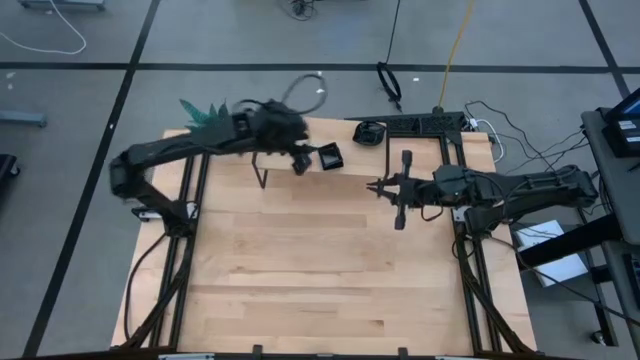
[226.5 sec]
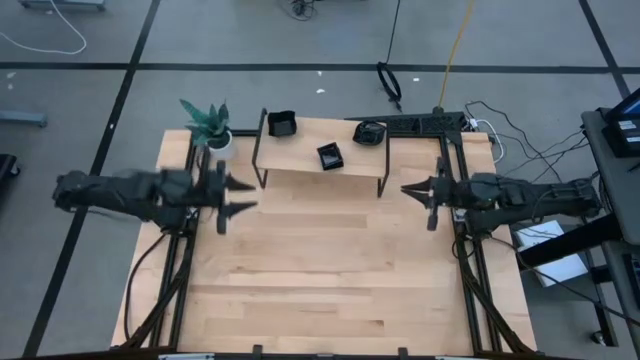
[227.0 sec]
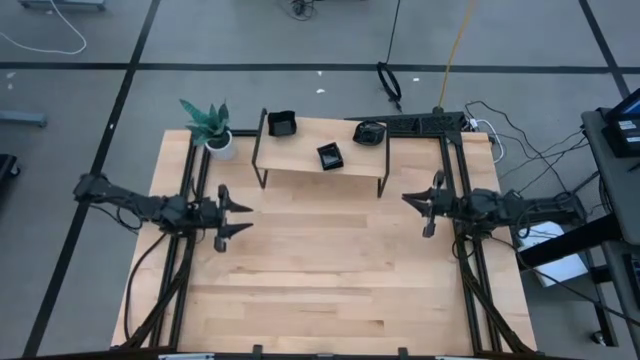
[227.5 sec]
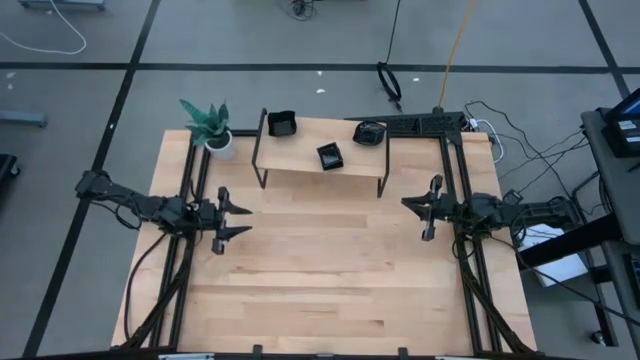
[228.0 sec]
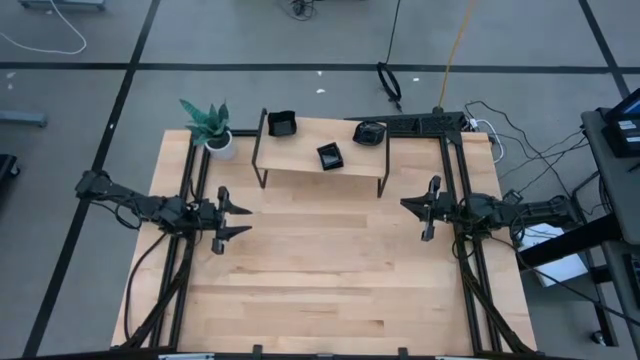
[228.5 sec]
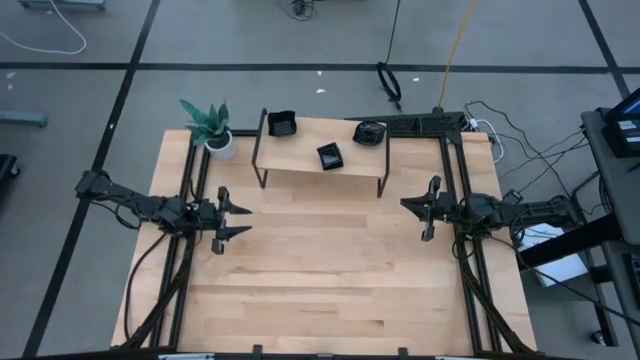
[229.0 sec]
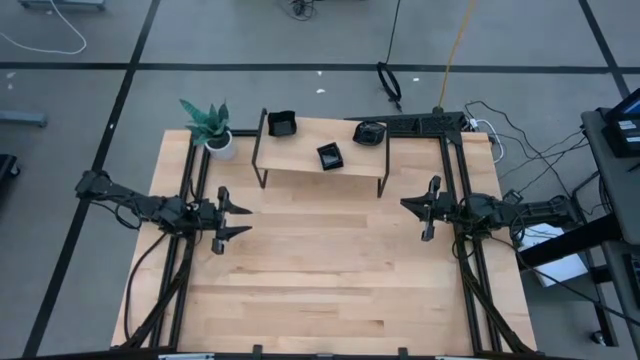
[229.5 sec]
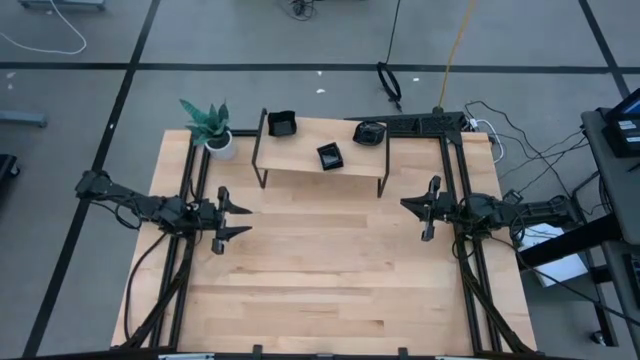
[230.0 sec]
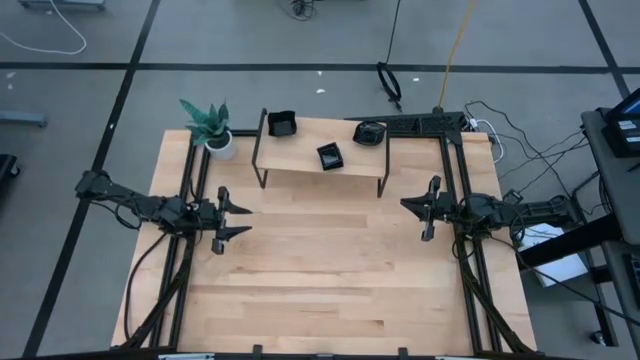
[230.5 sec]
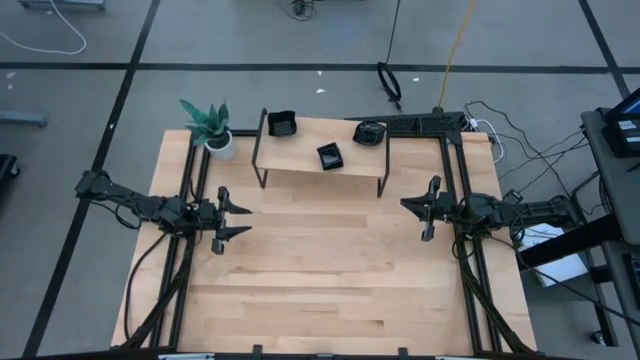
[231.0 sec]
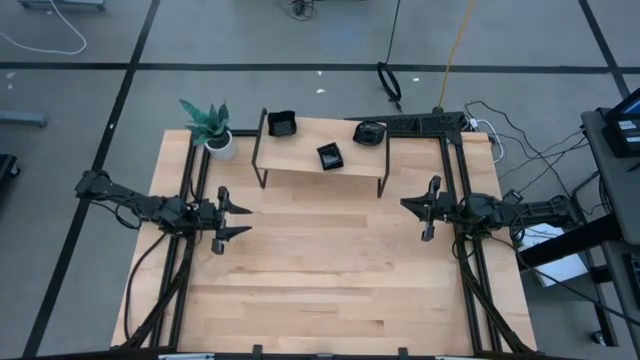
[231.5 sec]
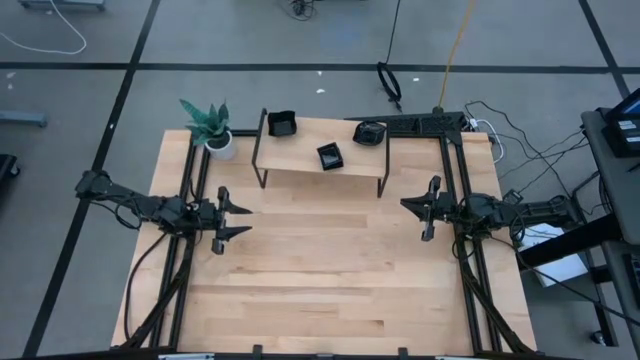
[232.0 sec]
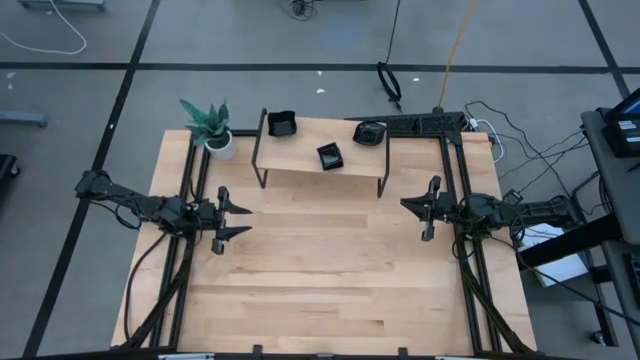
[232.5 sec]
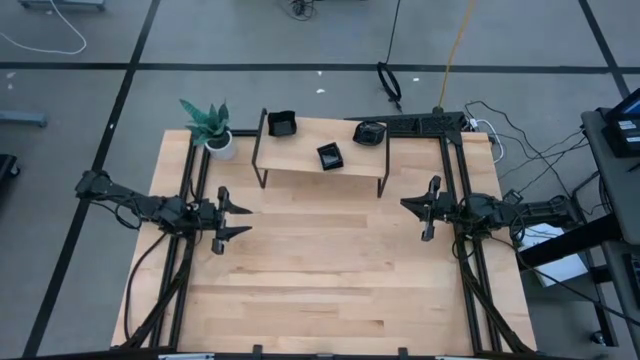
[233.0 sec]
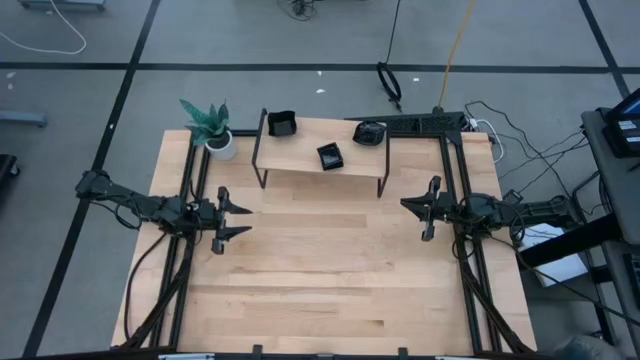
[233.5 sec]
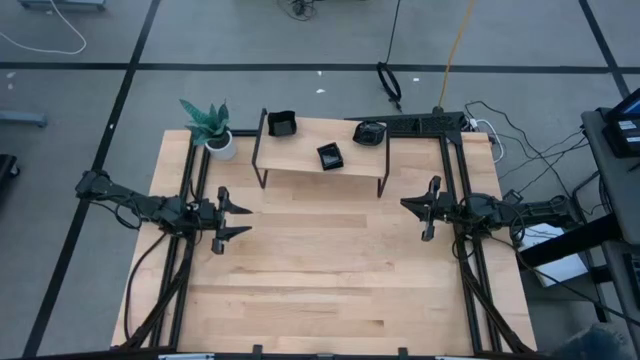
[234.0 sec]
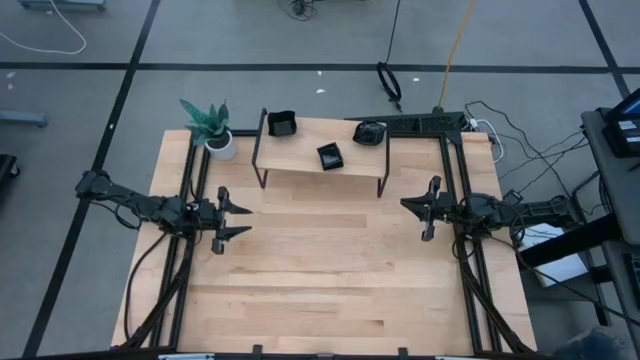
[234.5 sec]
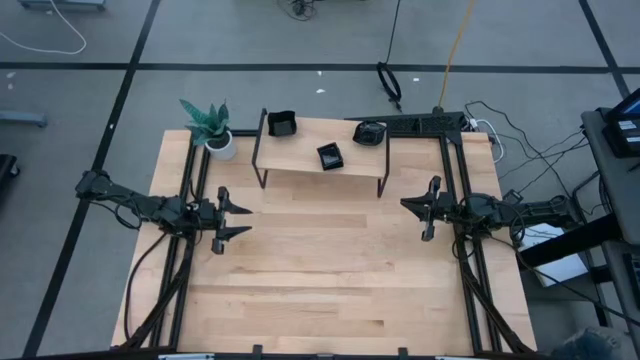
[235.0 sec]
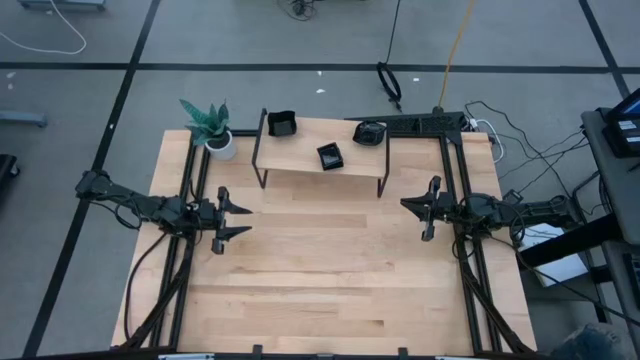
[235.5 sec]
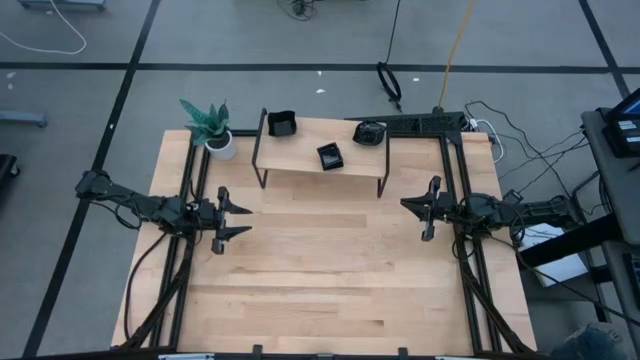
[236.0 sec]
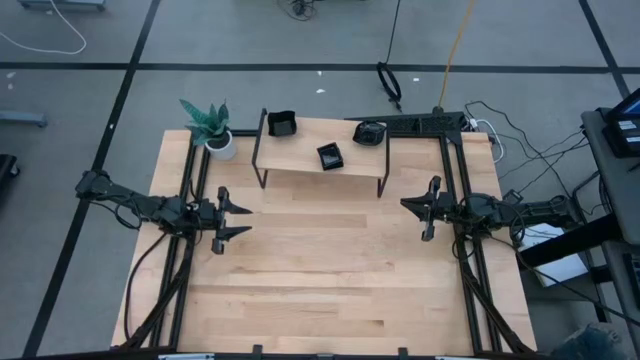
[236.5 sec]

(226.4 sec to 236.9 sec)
Task: Pick & Place Mini shaped plates
Return to Home Position

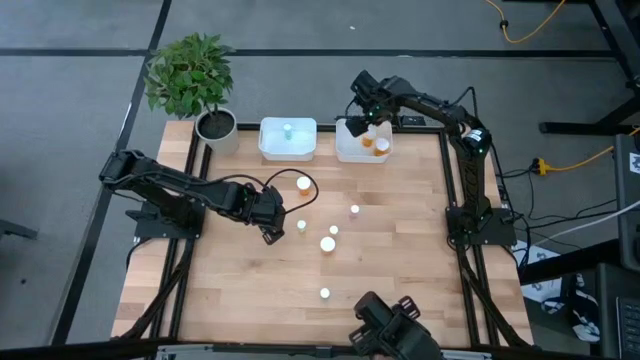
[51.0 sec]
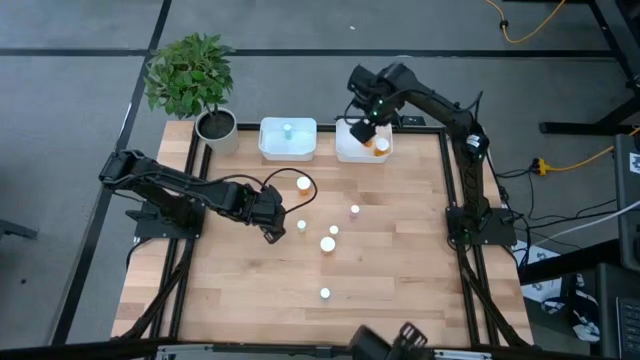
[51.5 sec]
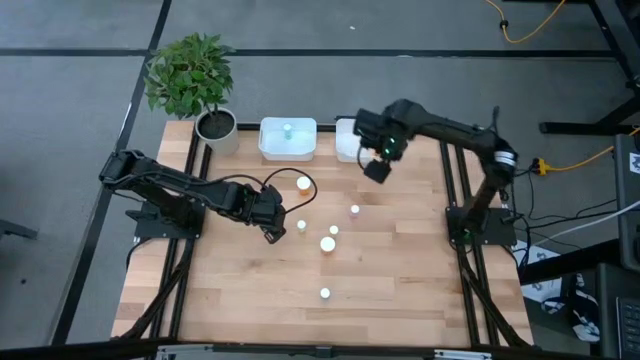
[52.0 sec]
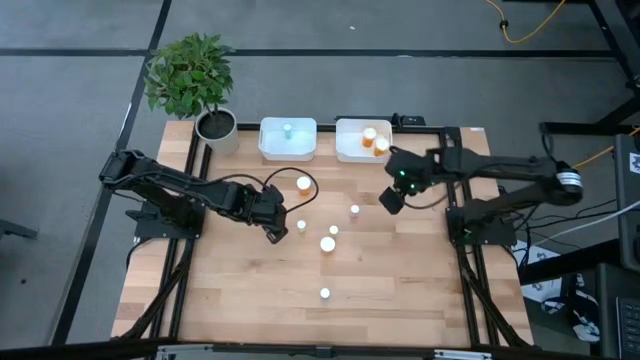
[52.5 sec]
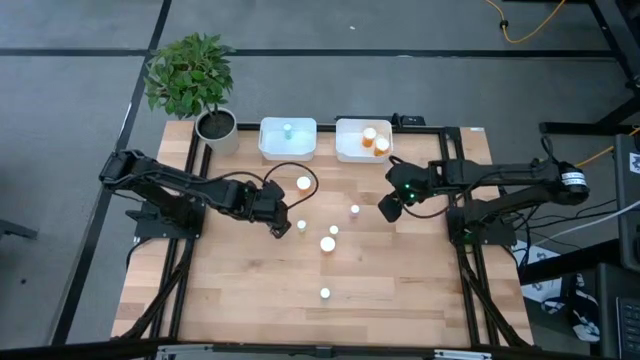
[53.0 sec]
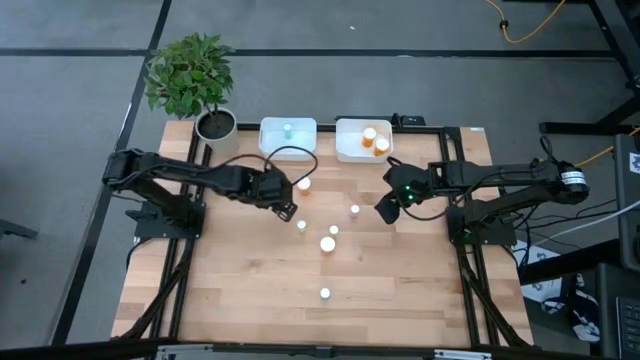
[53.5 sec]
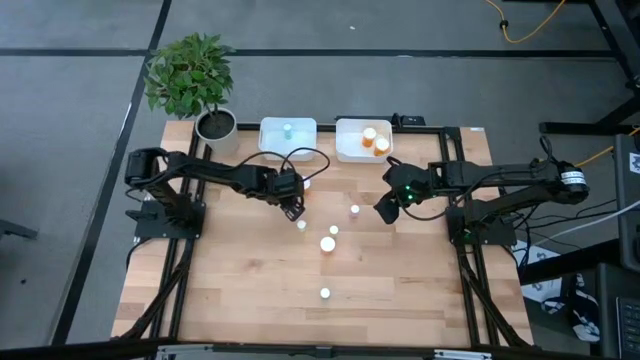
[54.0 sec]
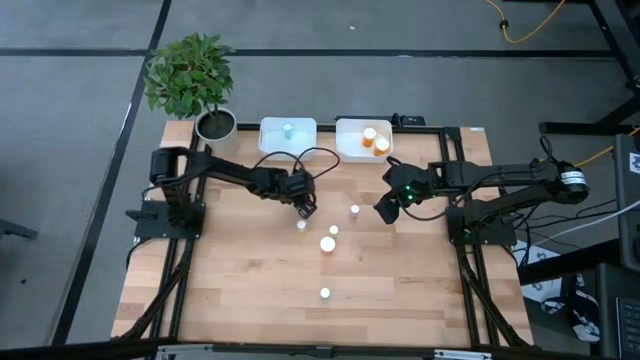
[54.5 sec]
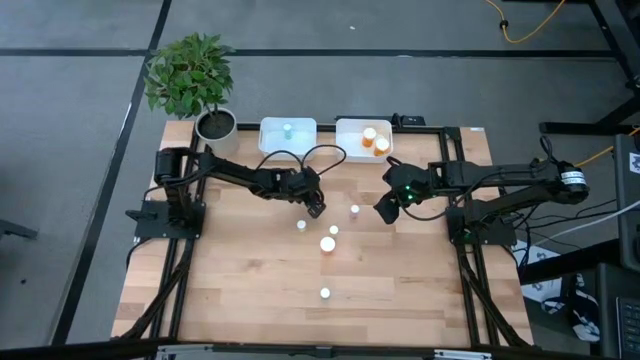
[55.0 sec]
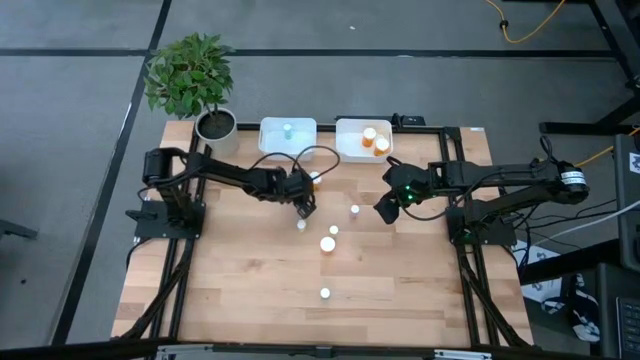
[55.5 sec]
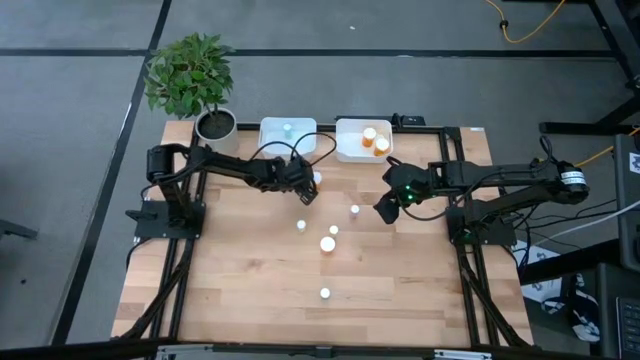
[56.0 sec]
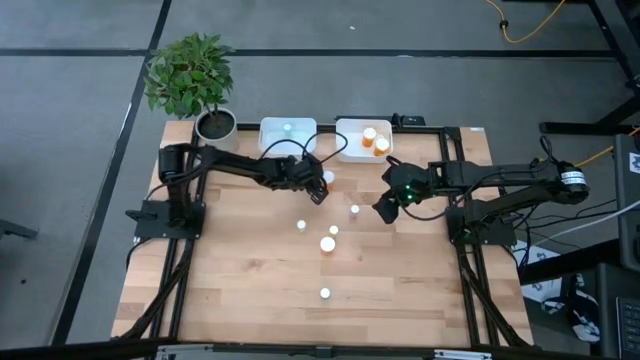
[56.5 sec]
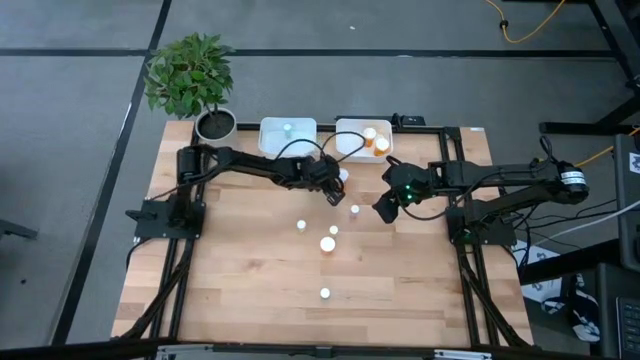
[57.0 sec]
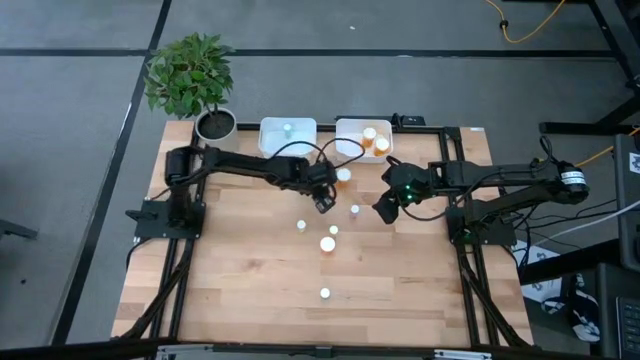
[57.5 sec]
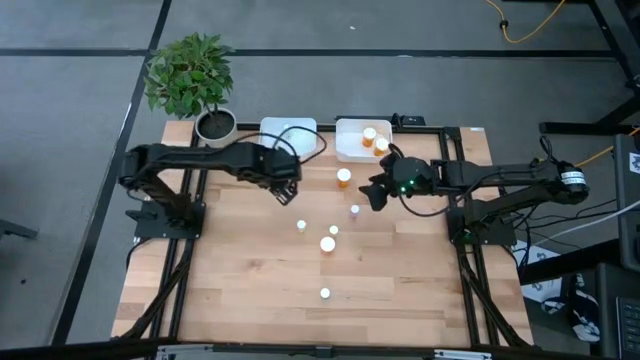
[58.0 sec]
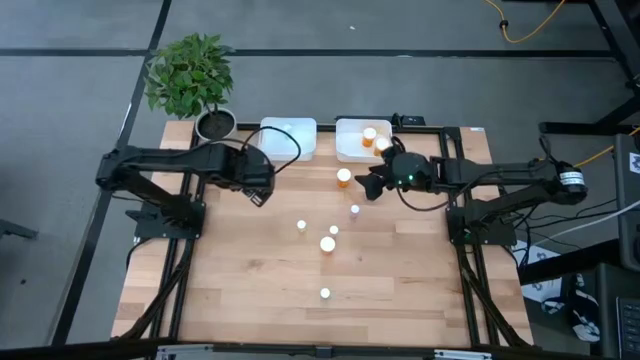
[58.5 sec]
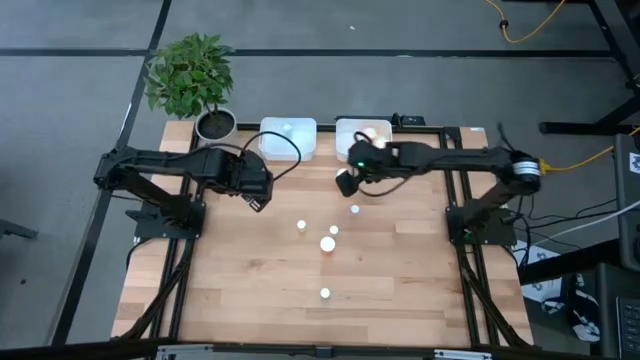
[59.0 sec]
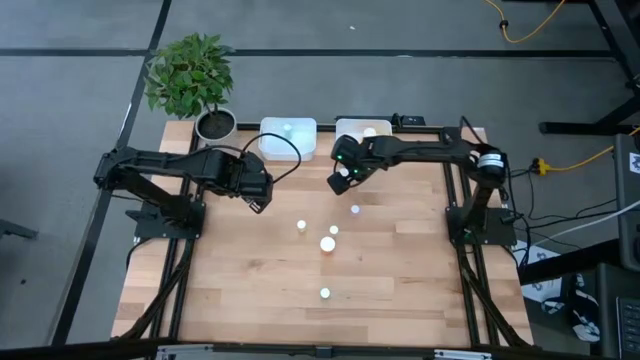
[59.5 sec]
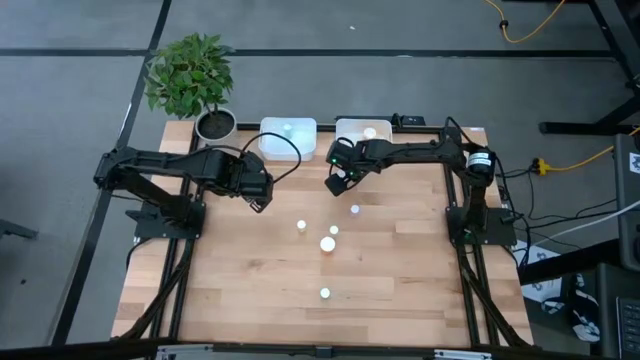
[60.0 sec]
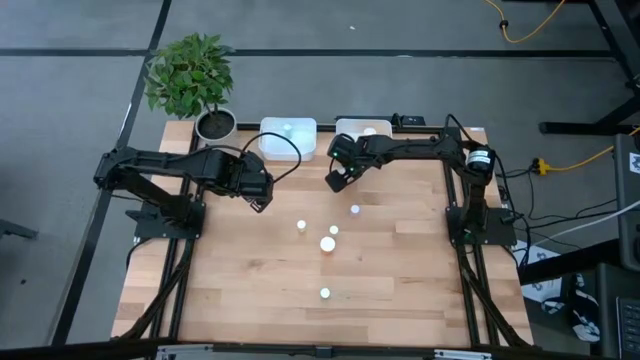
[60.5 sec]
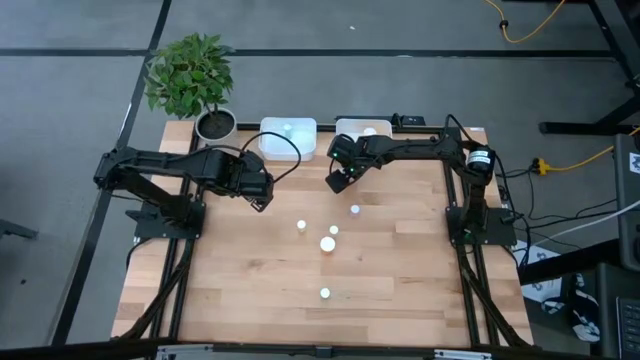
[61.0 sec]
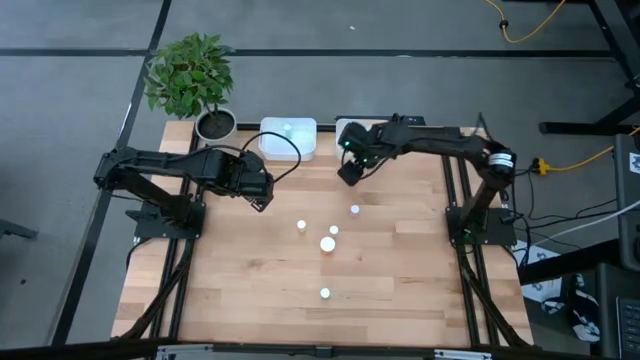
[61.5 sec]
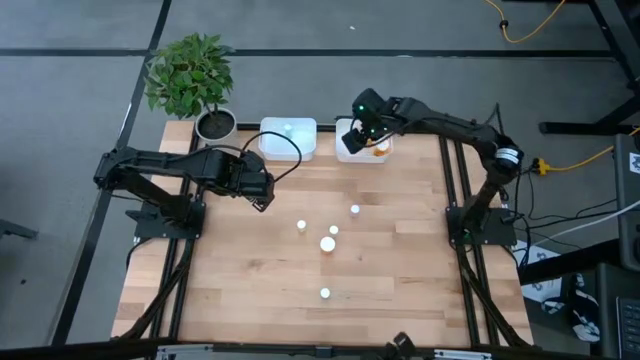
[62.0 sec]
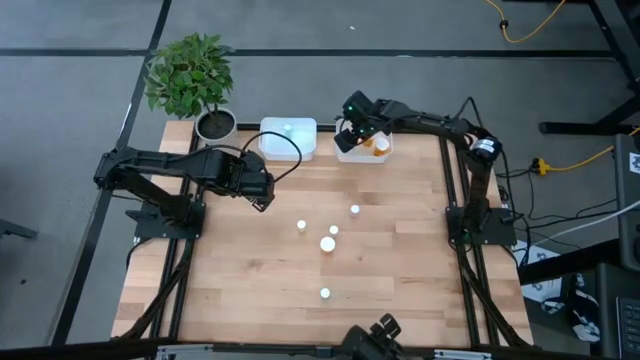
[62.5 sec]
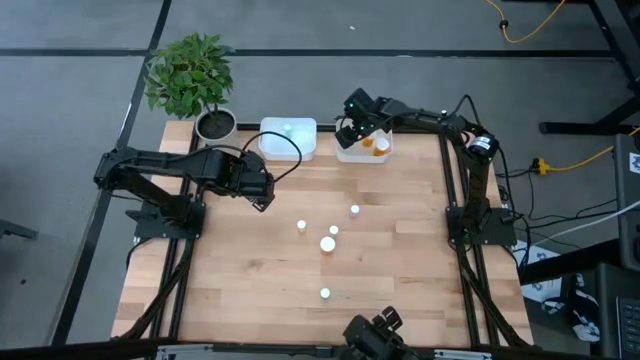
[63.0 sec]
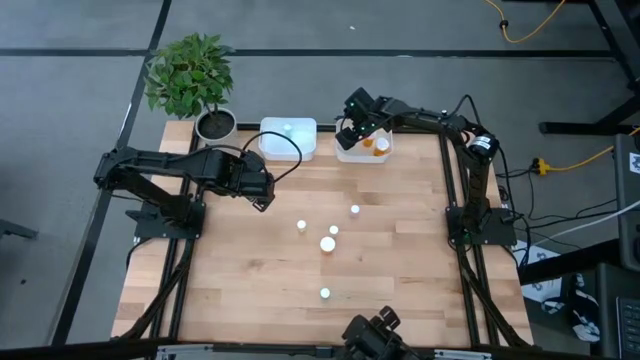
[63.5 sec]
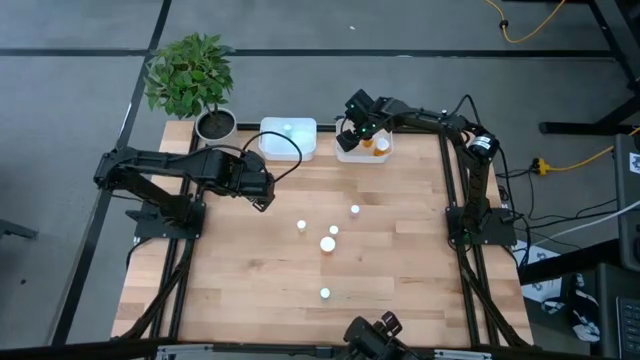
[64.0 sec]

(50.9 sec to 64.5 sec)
Task: Pick and place medicine bottles into bin by pill shape (circle, oval)
Put the top orange capsule bottle into the right white bin
